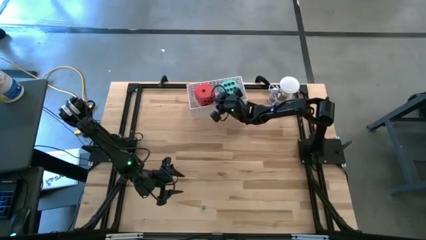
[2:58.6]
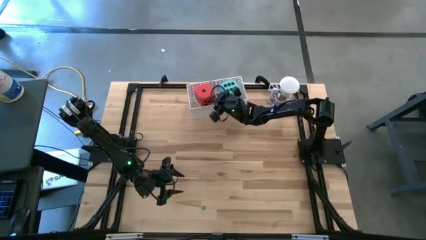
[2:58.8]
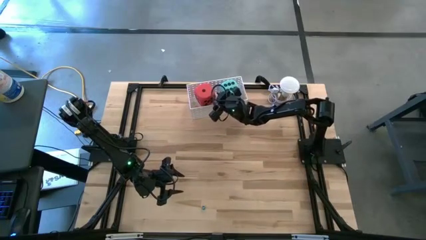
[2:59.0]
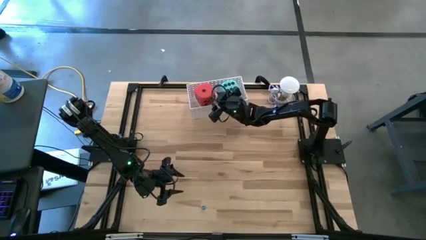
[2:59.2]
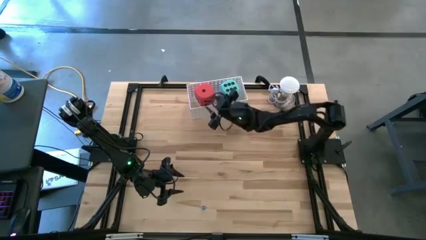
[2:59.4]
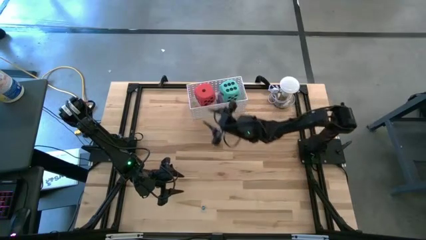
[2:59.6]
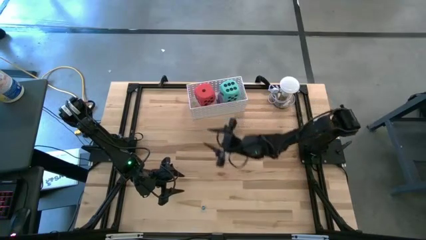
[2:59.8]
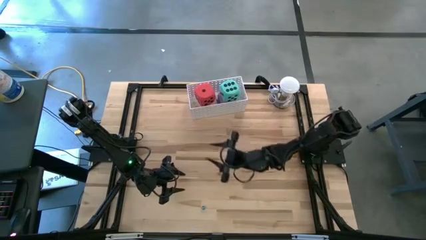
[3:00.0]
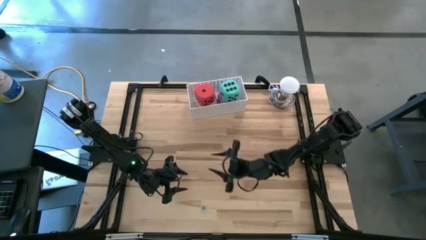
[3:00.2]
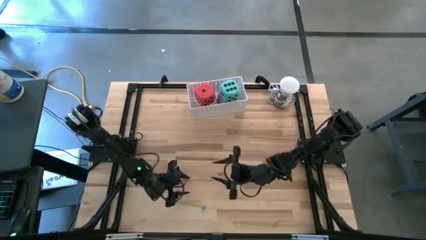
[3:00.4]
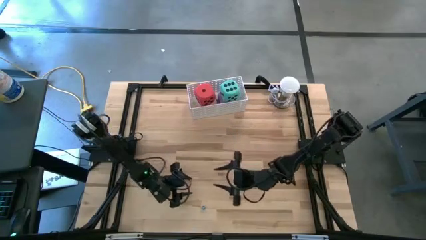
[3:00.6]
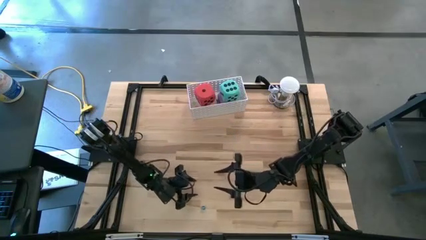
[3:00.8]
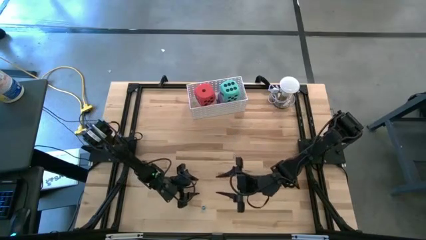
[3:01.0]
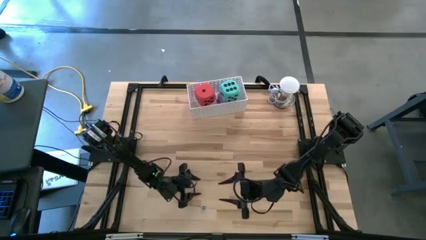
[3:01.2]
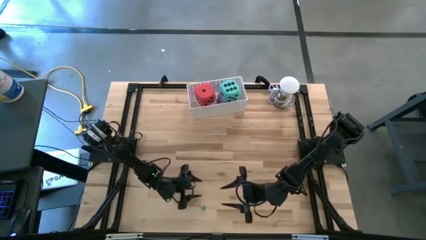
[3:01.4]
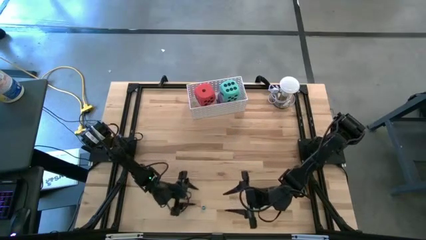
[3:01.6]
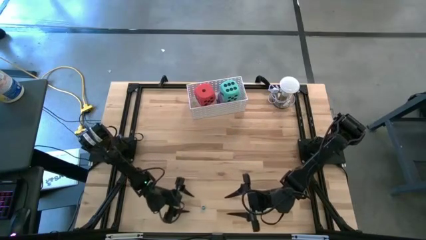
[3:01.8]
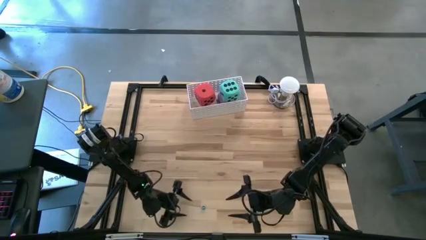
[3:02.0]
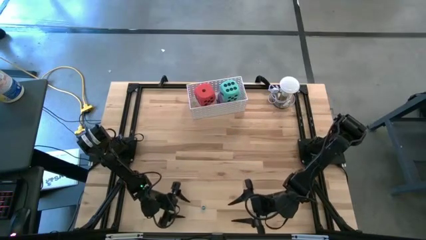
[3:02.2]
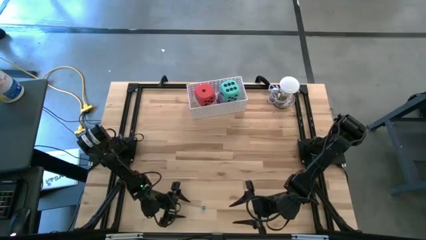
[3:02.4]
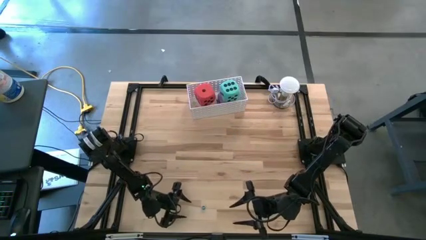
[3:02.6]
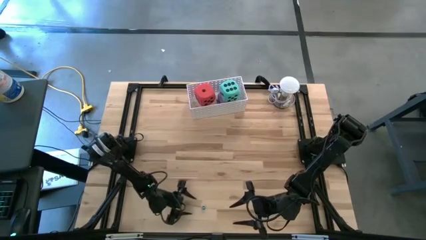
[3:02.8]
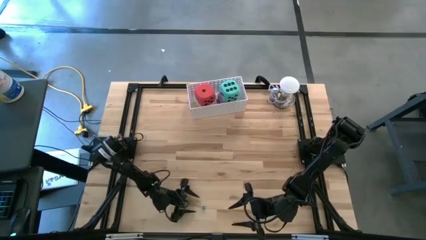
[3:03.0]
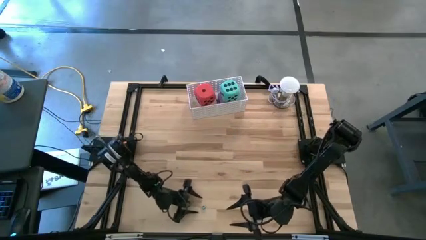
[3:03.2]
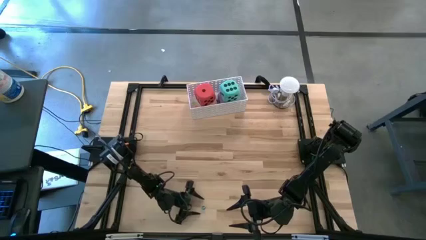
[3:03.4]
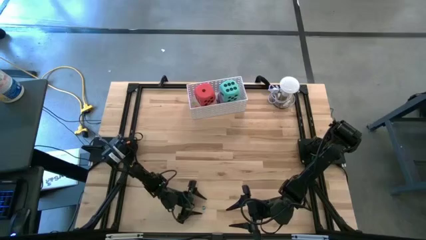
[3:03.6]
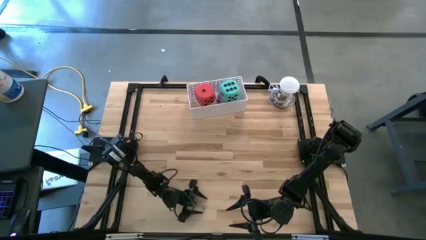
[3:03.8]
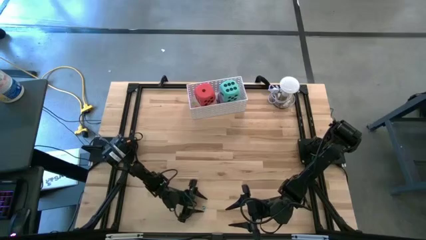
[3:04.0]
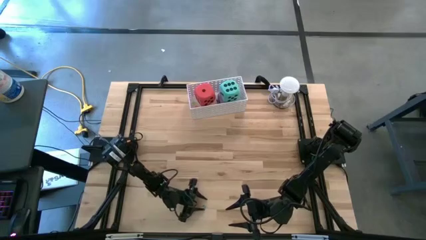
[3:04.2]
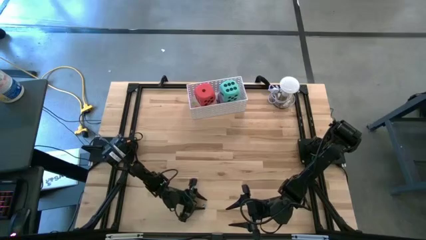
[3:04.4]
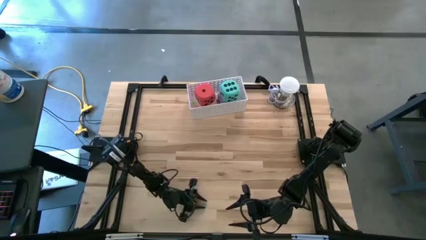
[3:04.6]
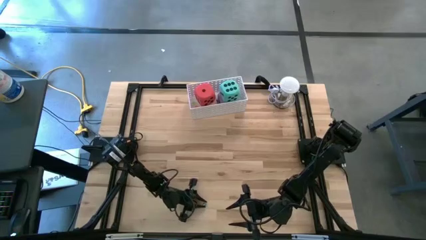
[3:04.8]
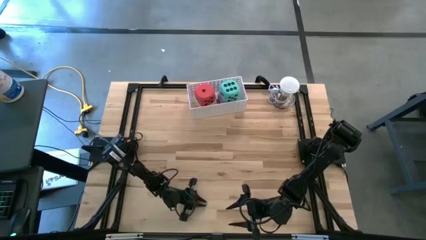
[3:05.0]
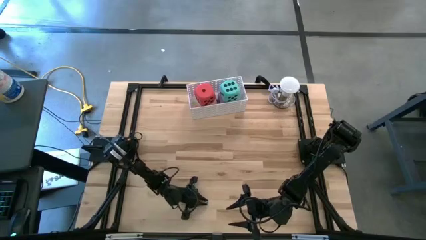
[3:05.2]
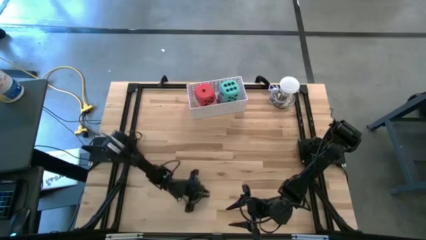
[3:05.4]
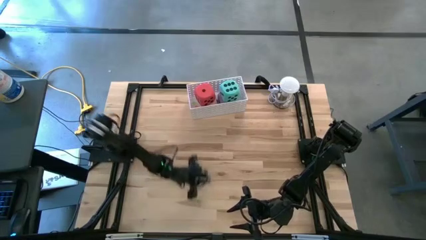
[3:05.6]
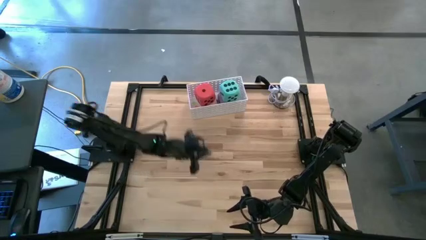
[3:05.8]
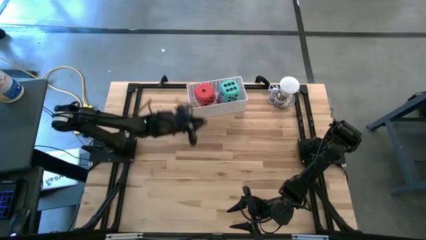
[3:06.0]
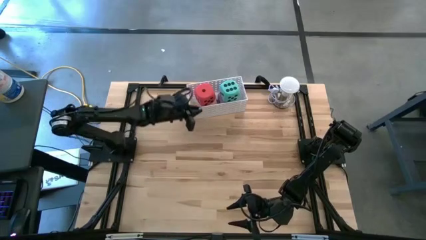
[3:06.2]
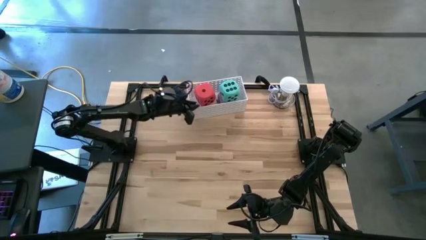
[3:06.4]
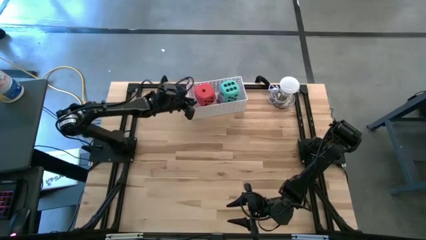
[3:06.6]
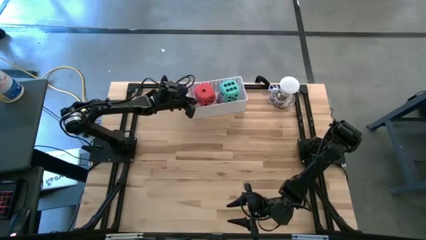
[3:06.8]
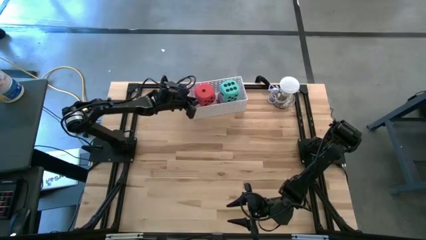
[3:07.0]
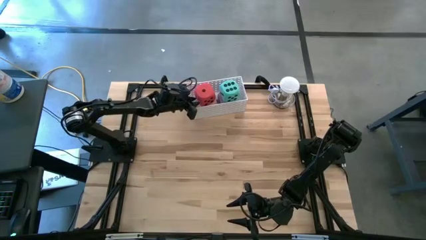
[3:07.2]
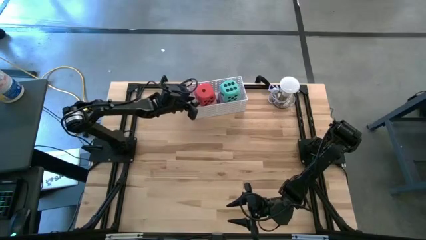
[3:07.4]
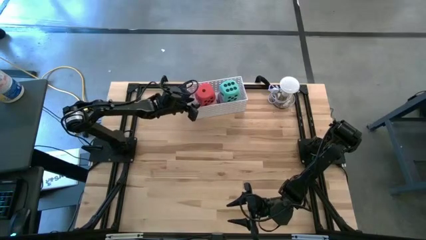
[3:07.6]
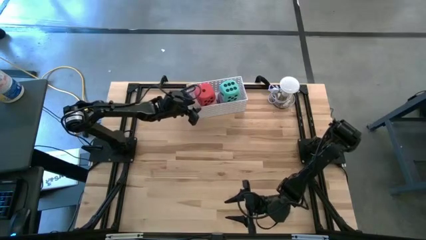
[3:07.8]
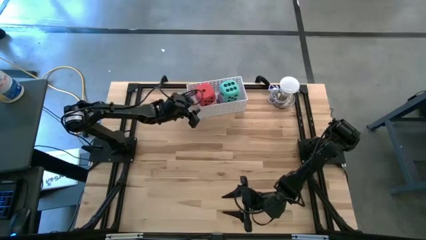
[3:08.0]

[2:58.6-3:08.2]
Task: Pick & Place Dice
Put the small light blue into the white bin

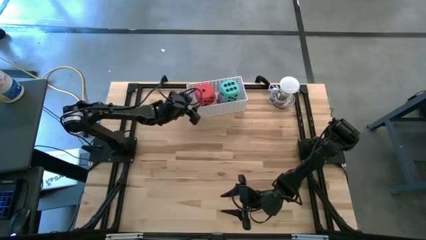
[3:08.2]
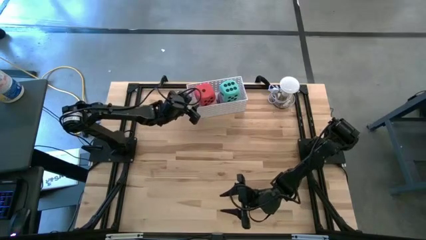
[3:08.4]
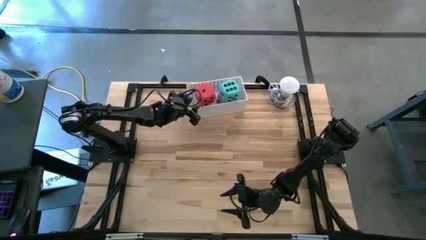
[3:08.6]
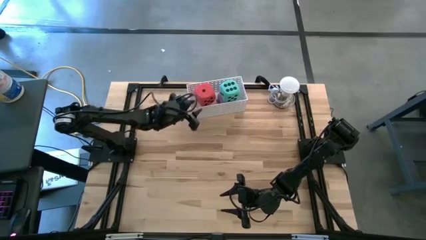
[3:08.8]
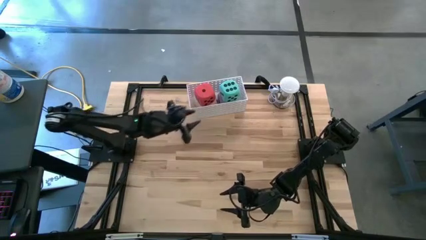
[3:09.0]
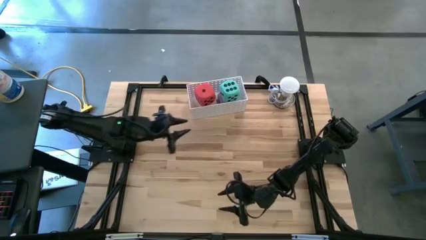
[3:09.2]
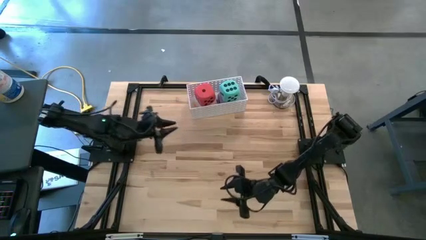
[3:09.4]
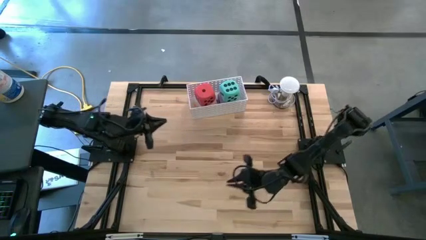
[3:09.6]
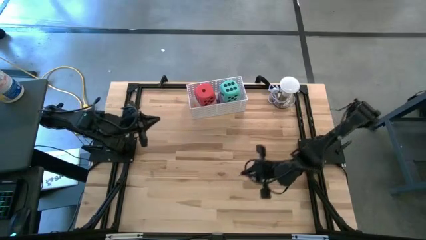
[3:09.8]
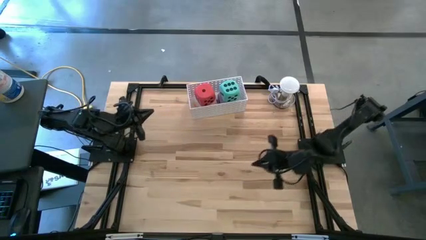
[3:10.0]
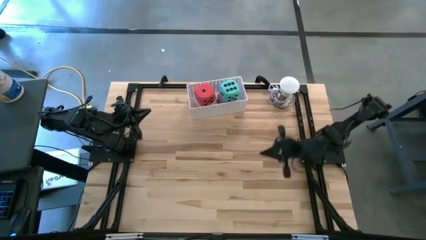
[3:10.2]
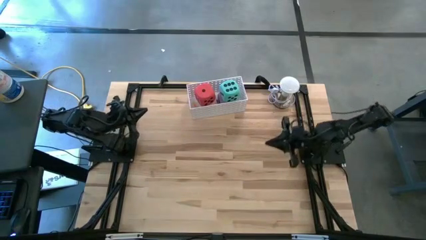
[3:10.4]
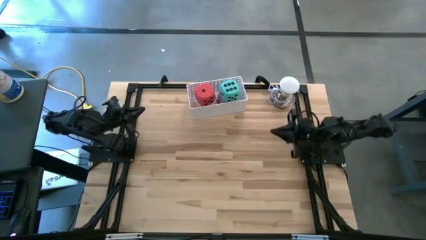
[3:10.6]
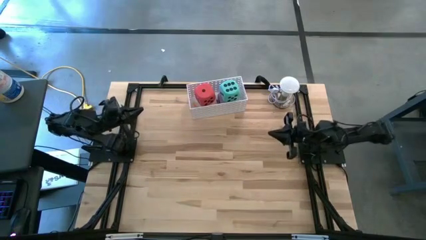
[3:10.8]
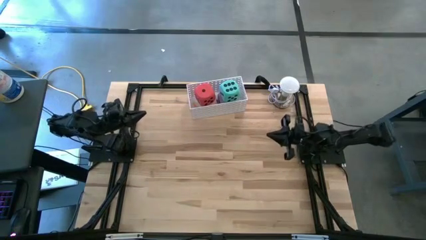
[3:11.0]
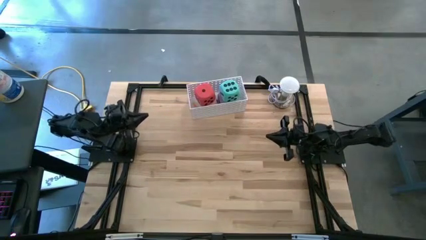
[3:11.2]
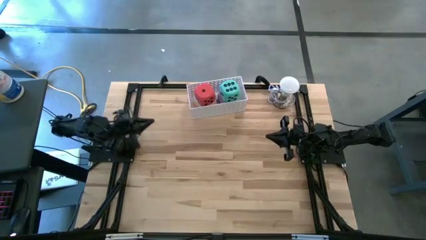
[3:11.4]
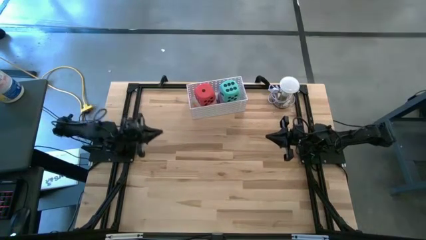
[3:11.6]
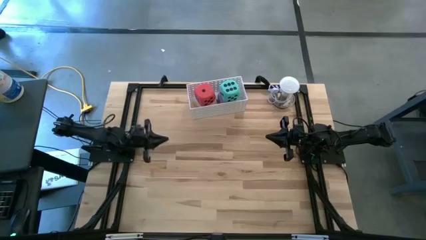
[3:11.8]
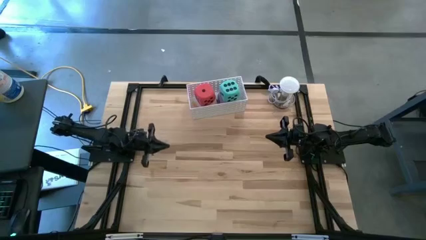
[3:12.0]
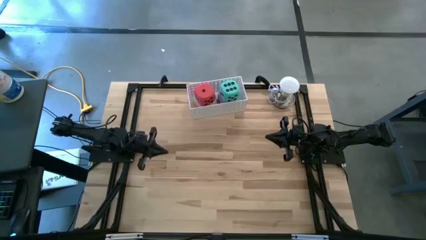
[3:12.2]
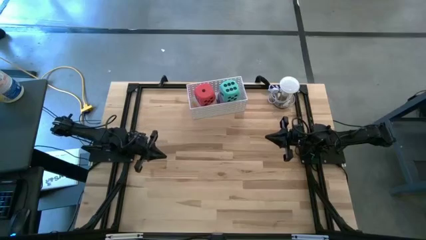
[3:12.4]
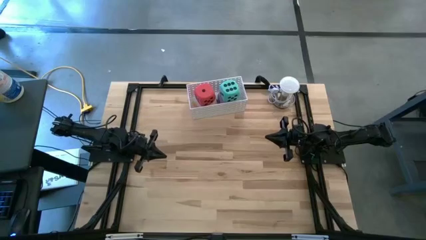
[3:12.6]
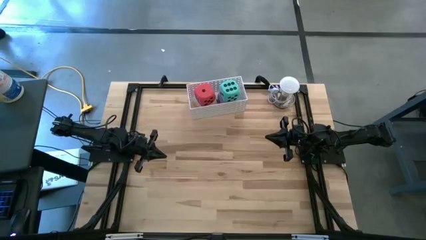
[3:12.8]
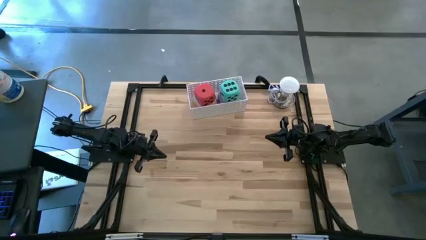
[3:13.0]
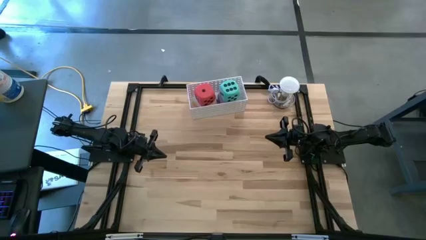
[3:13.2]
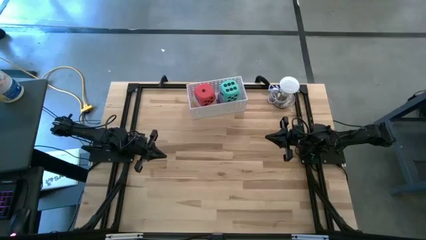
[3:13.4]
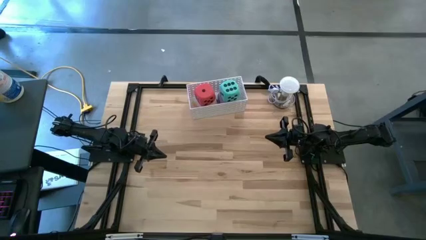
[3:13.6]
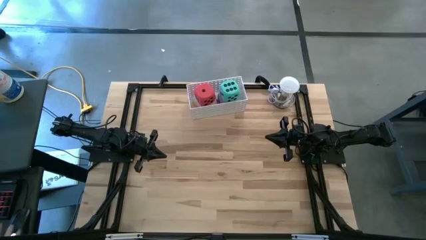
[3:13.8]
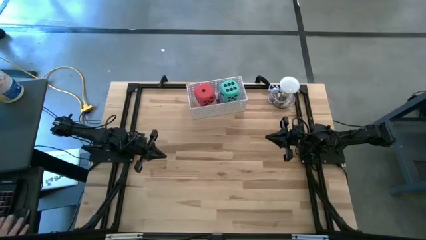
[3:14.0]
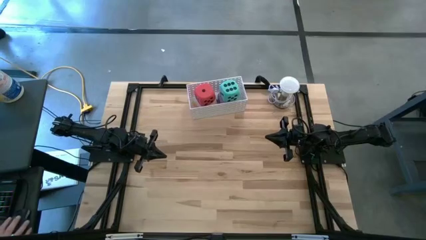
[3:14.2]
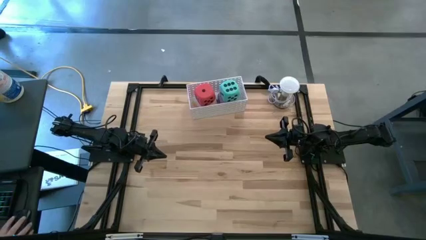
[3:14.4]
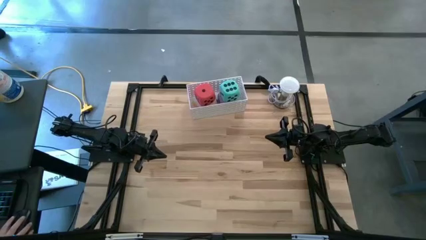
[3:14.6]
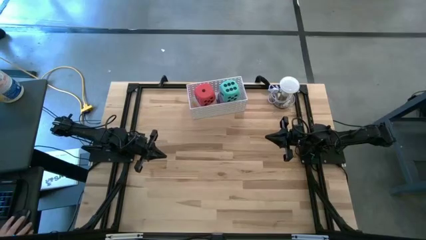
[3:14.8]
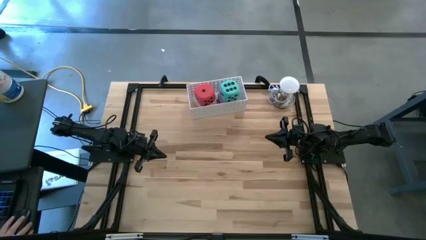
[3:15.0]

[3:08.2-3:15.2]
Return to Home Position

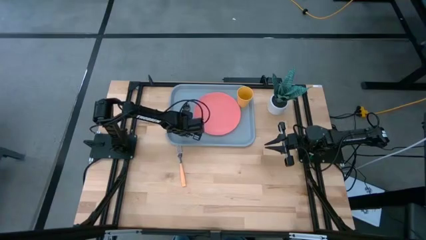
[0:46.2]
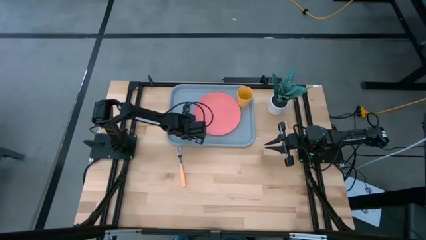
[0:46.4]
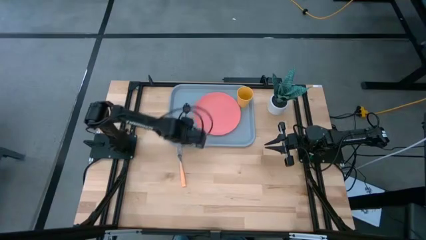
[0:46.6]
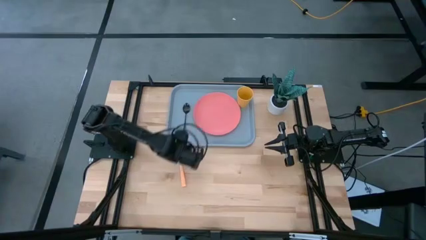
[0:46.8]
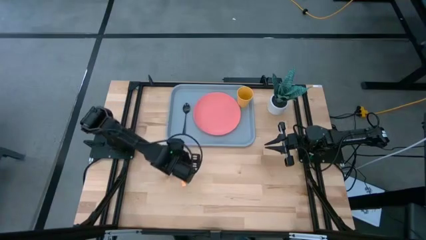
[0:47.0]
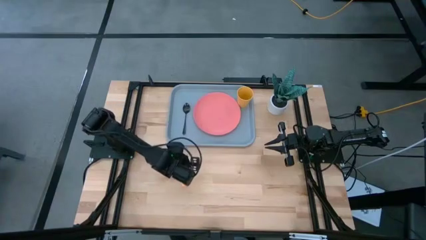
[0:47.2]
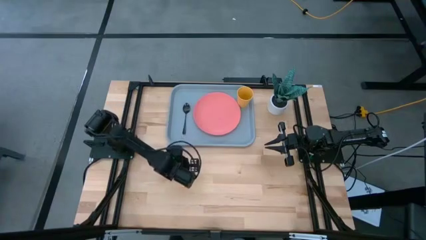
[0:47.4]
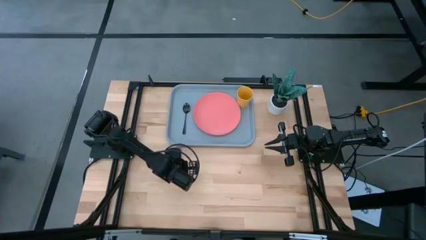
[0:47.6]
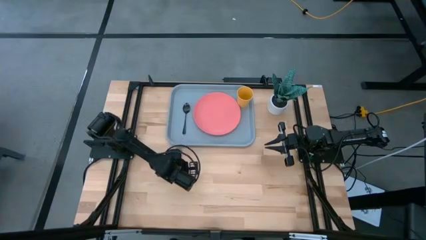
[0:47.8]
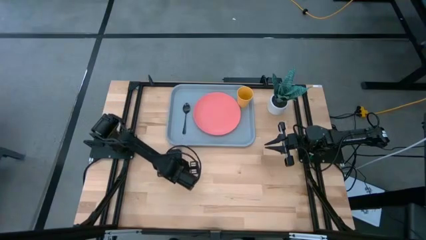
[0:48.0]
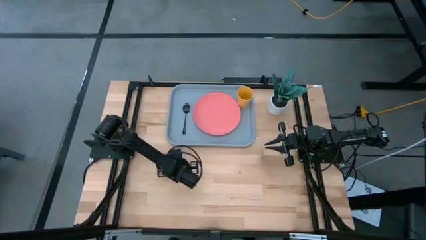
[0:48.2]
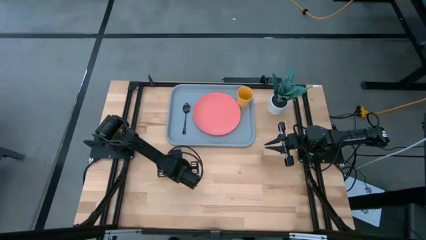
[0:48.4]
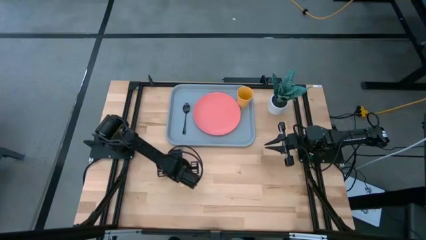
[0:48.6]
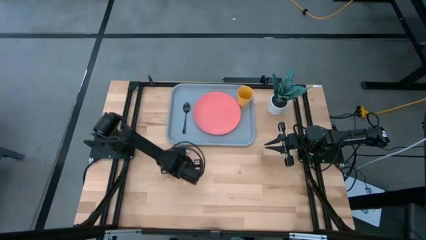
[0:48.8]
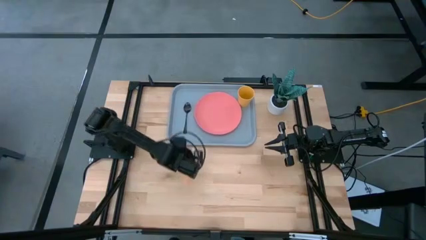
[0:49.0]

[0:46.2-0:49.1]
Task: Pick and place plate/cup/fork/spoon on tray
Put the orange fork on the blue tray to the left of the black spoon
